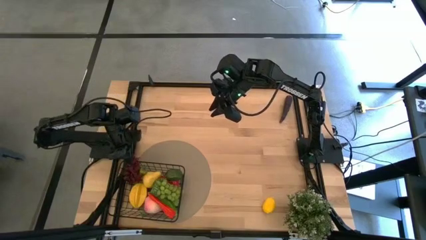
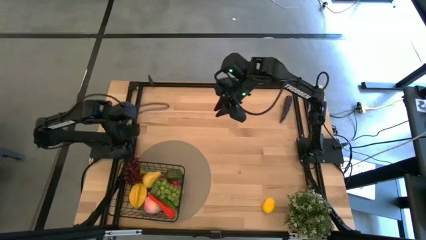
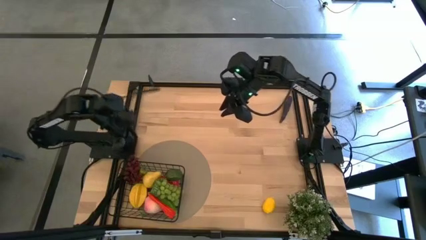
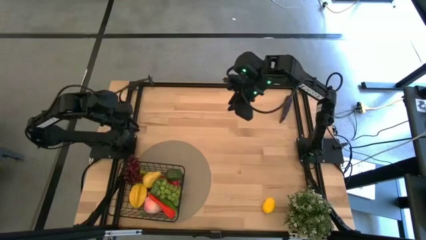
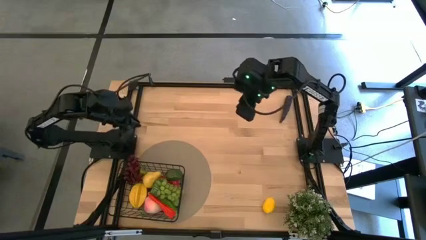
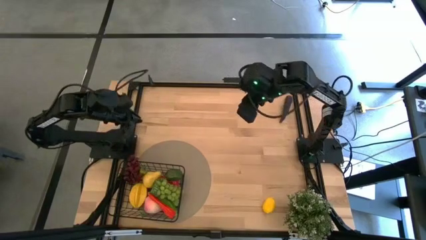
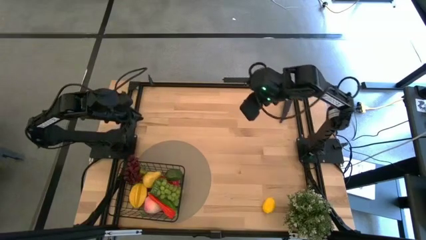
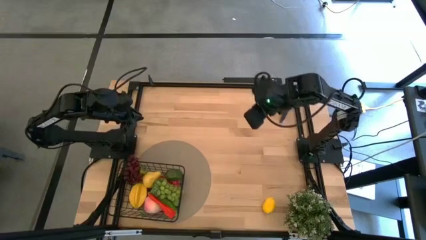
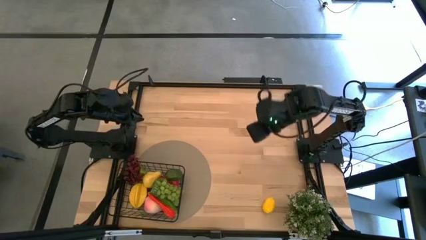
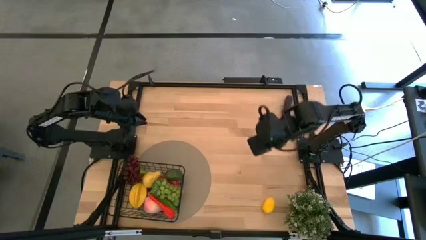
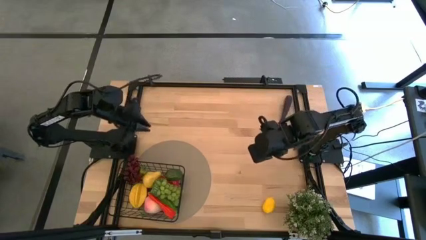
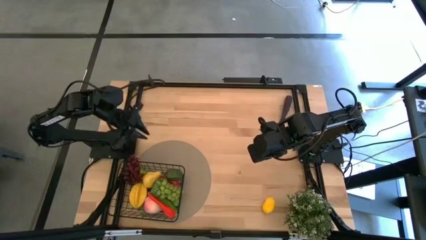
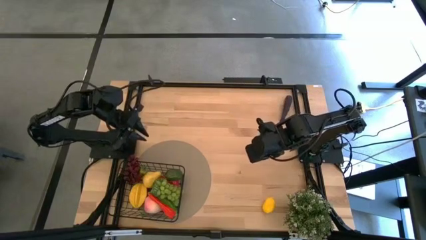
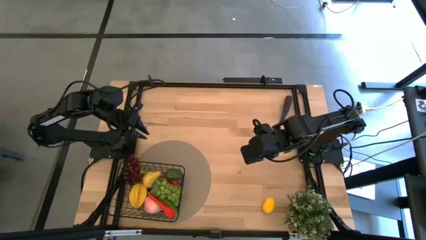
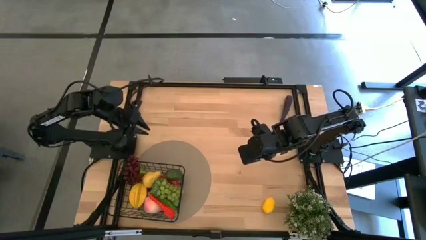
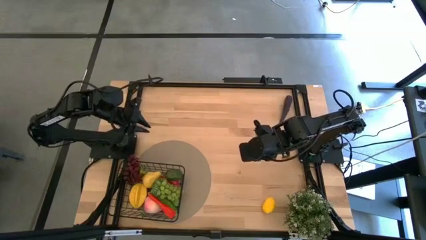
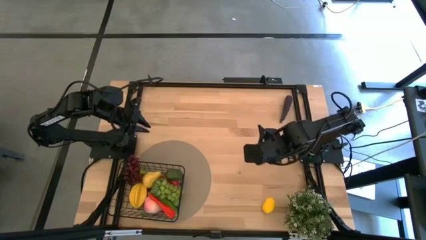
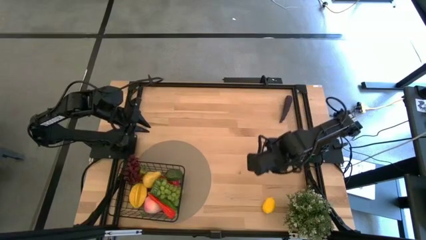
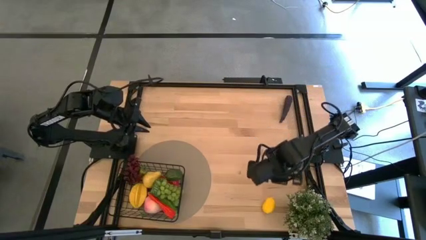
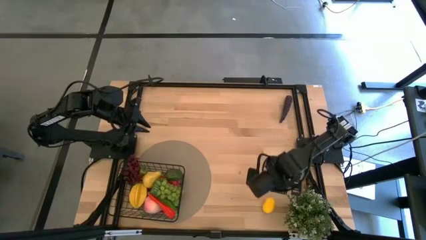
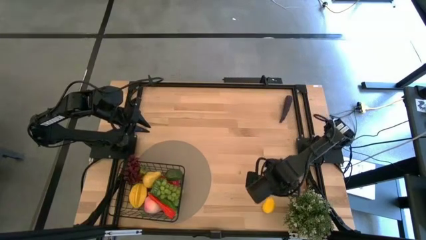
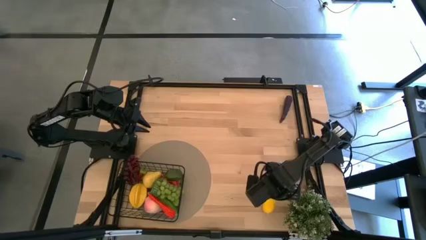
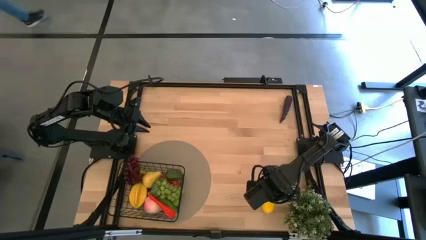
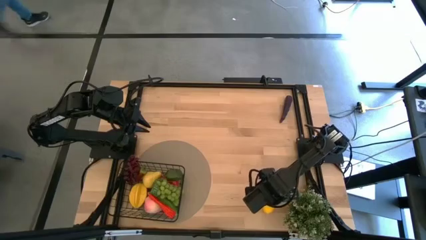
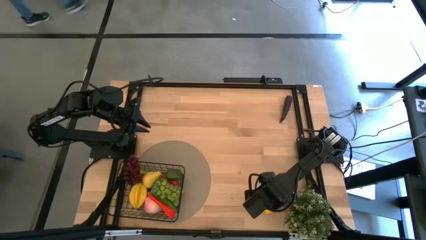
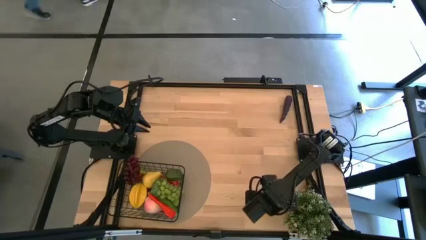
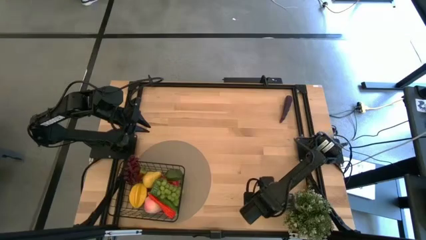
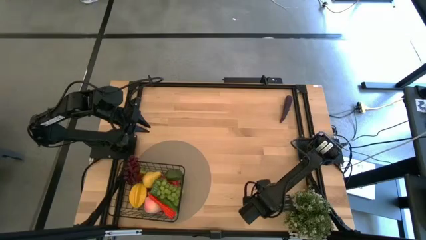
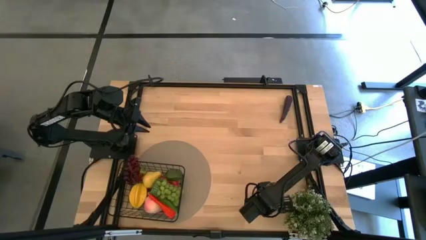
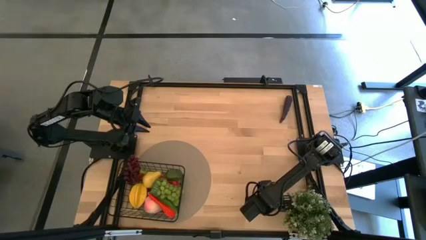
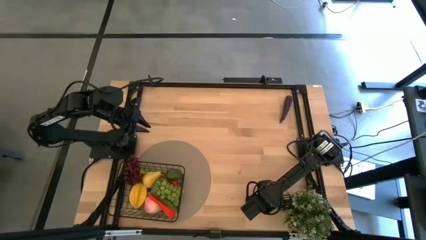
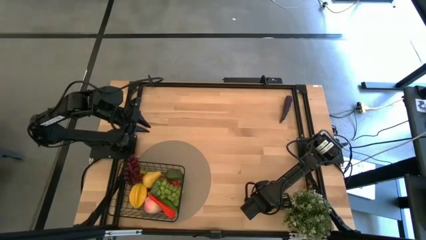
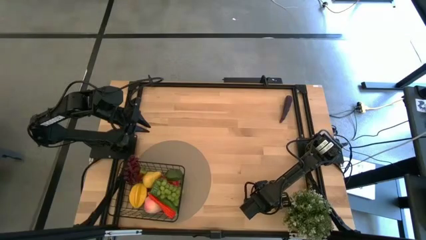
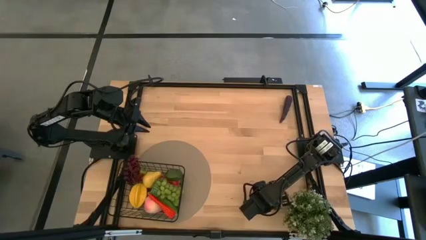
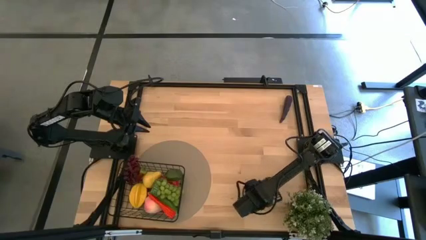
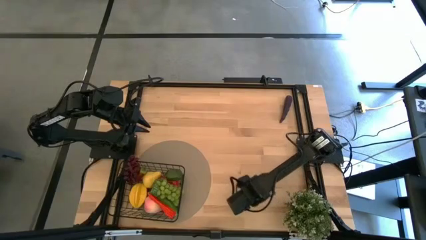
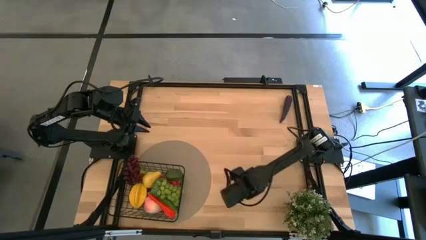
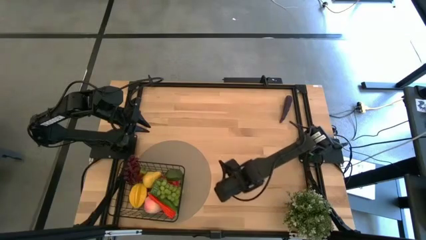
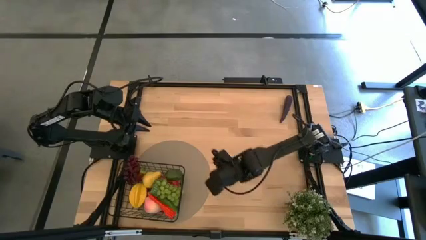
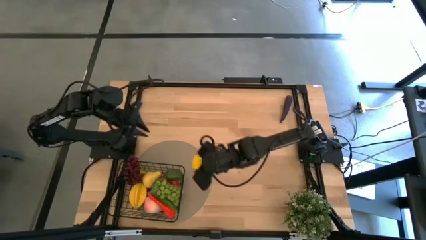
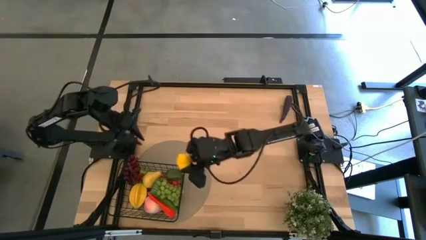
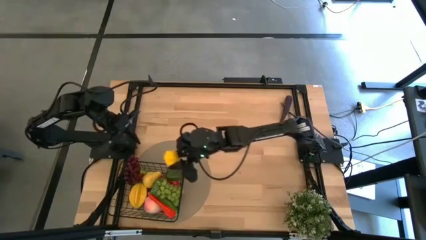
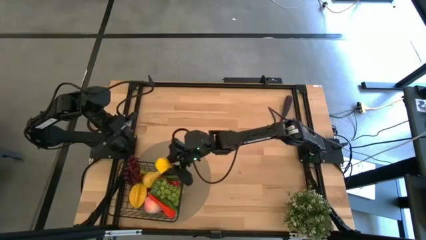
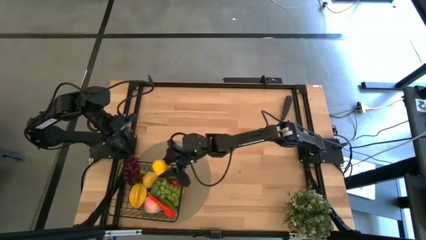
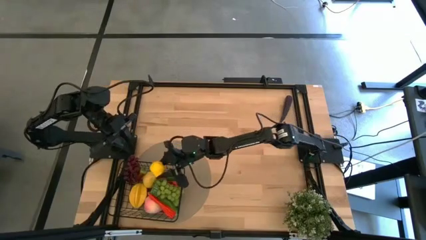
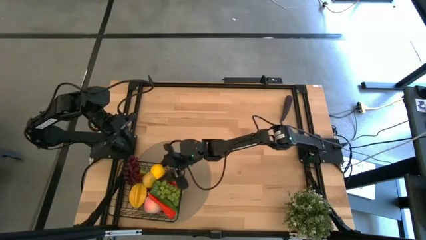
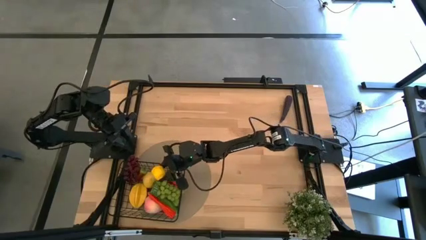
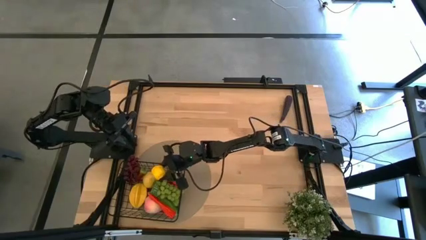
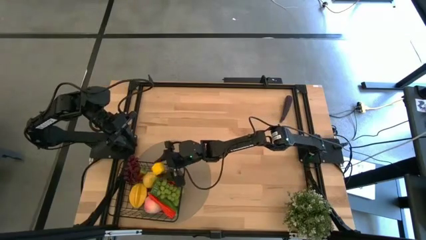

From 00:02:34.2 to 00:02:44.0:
Task: Build produce basket
Put the yellow lemon into the wire basket
